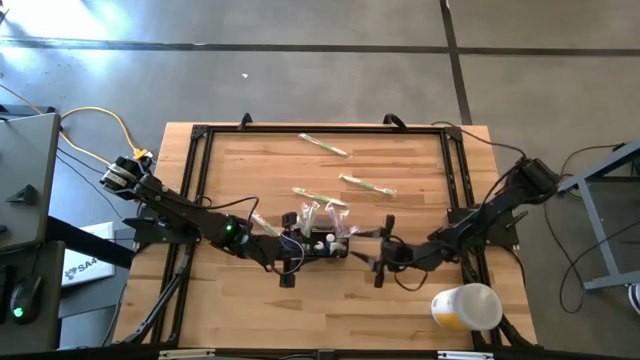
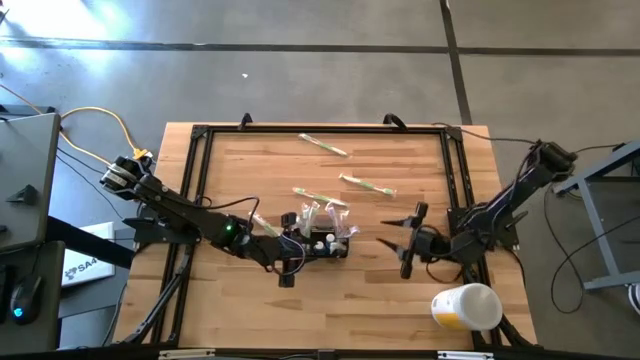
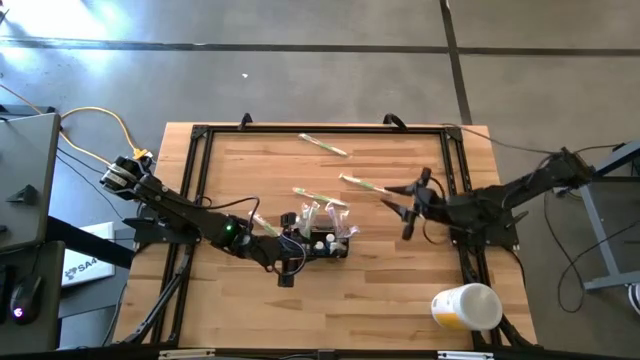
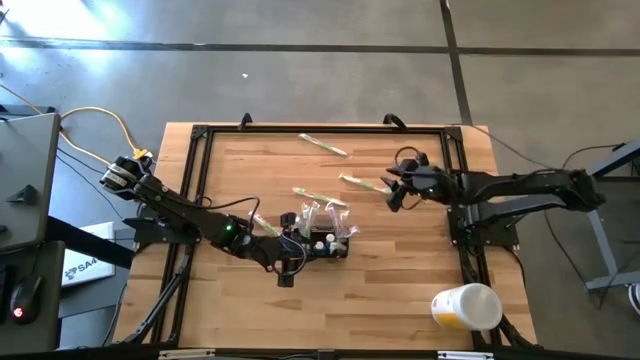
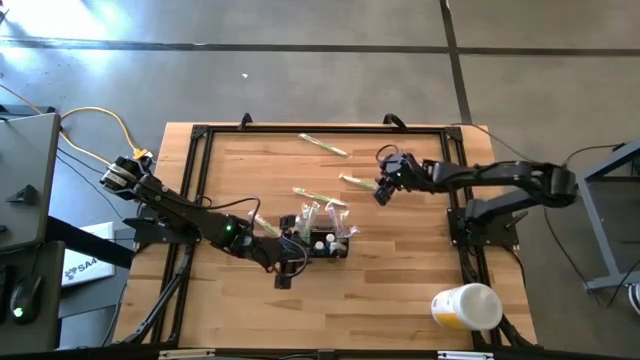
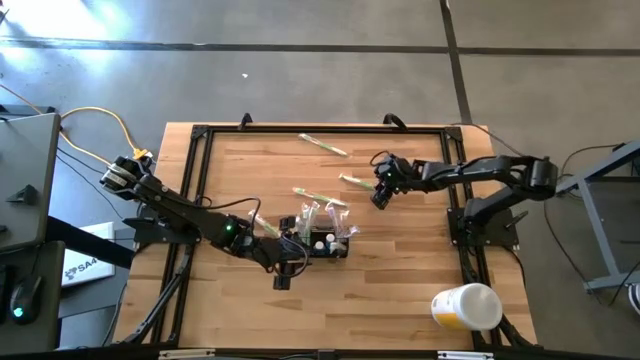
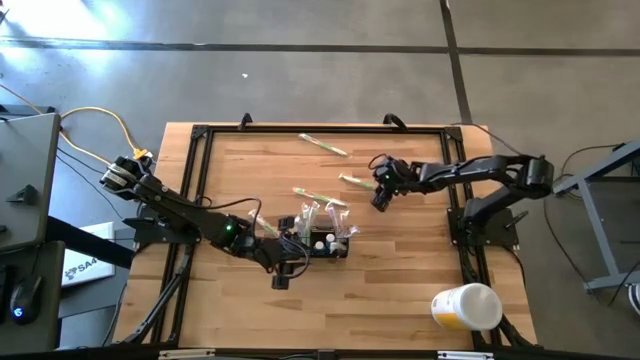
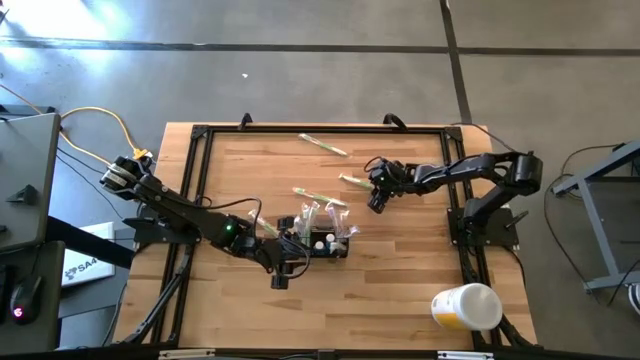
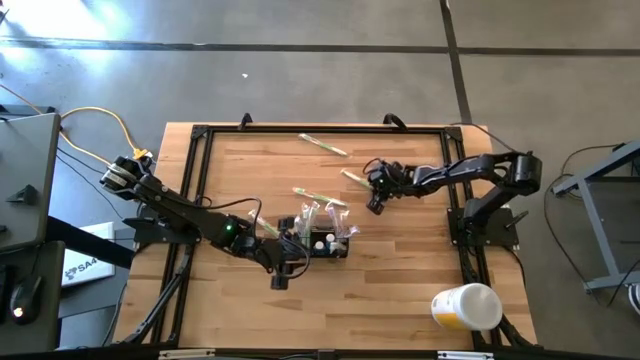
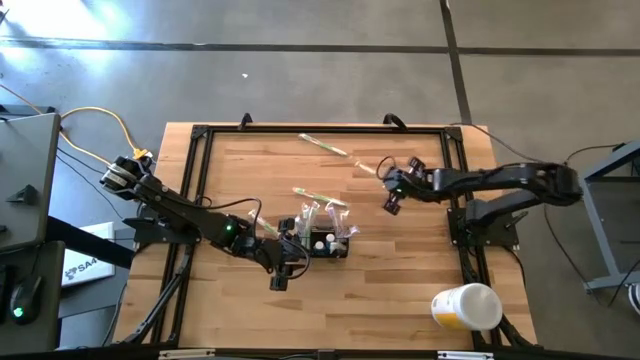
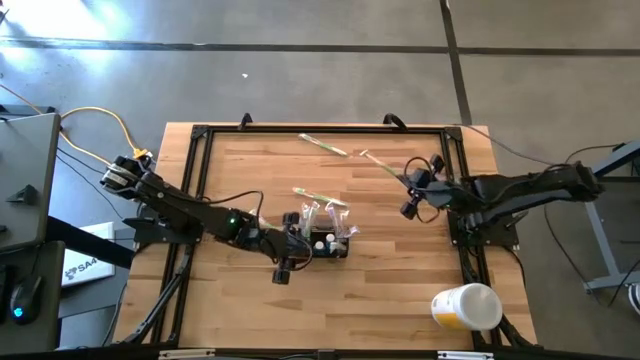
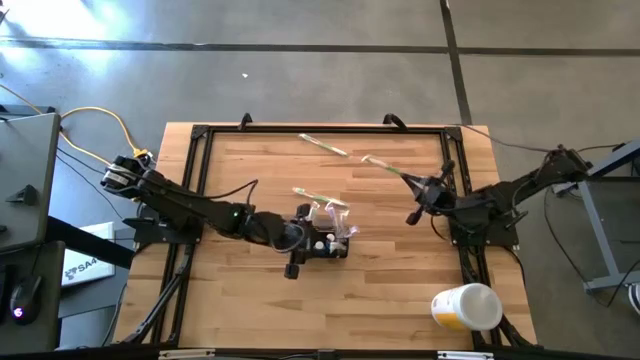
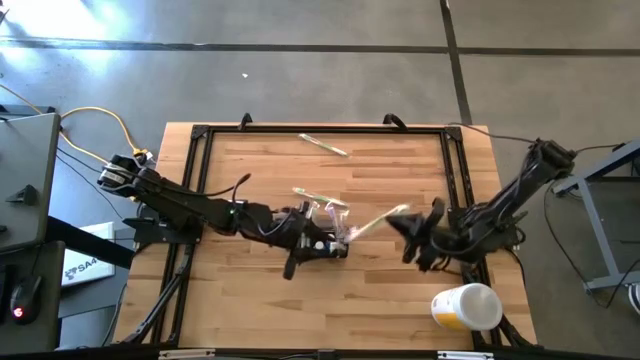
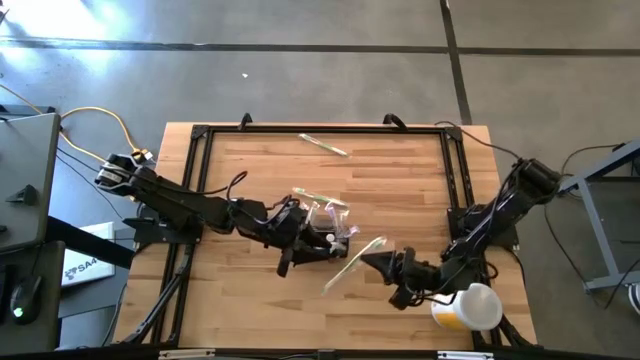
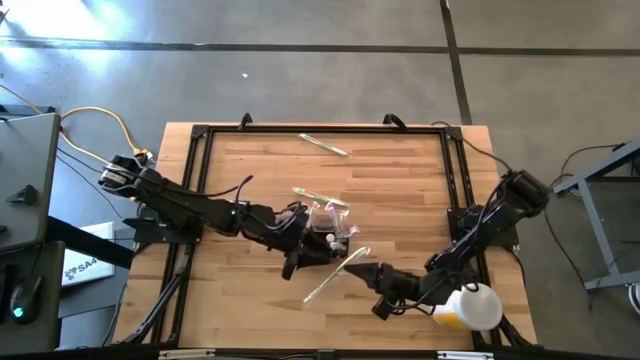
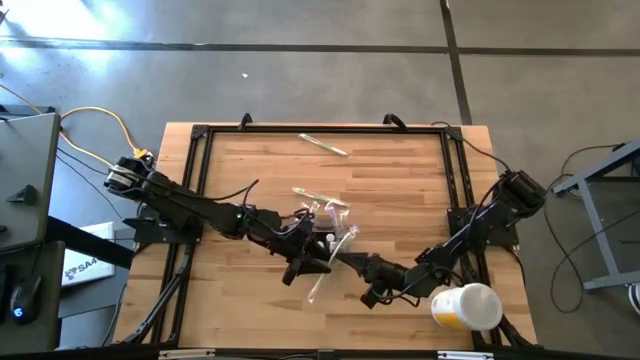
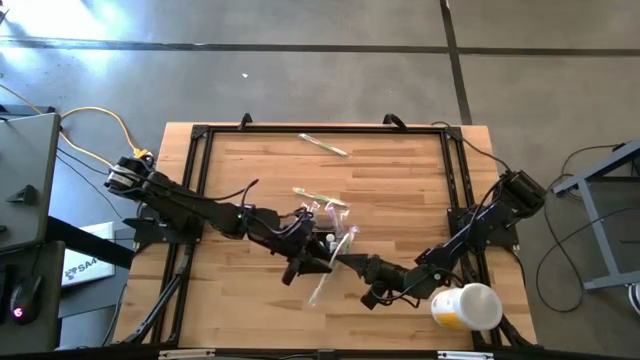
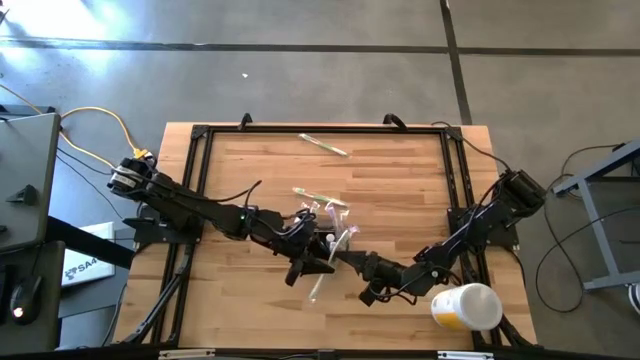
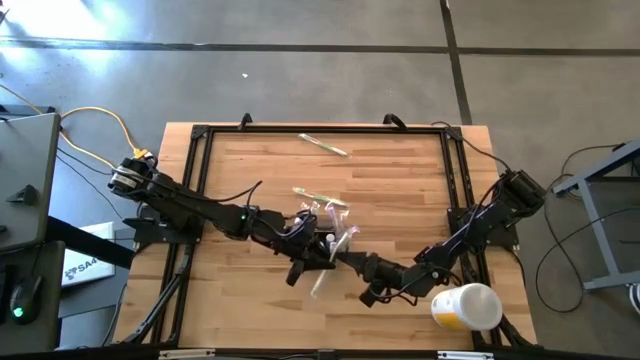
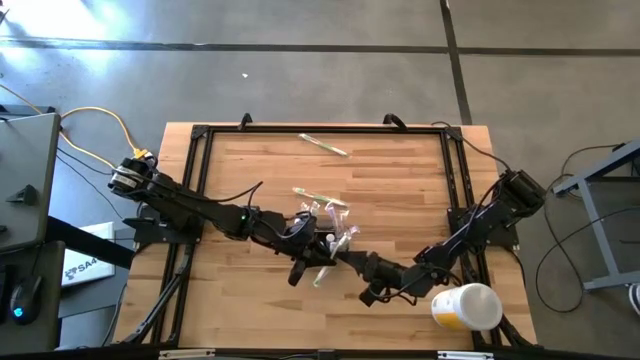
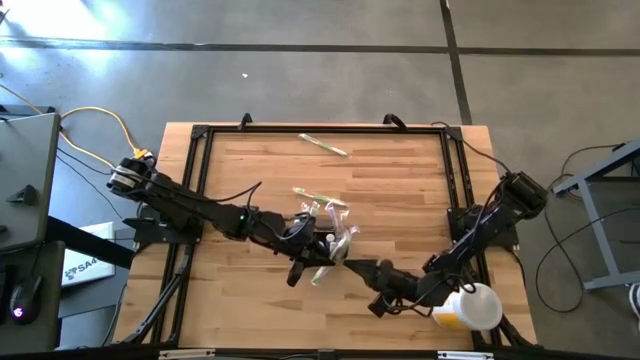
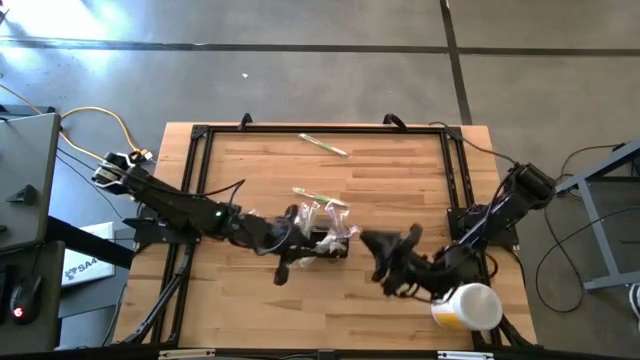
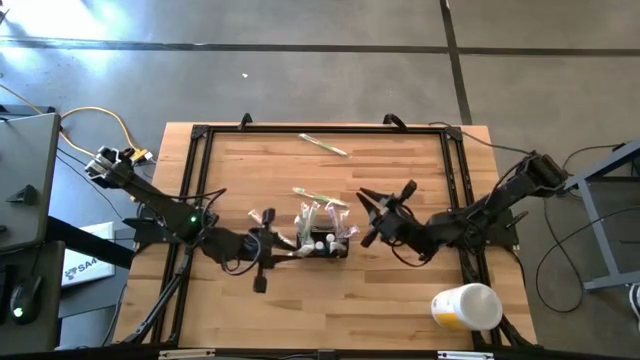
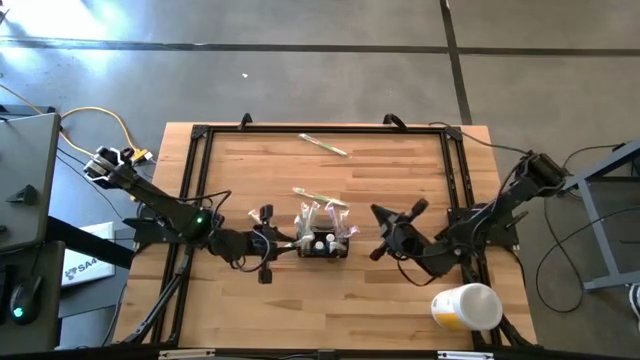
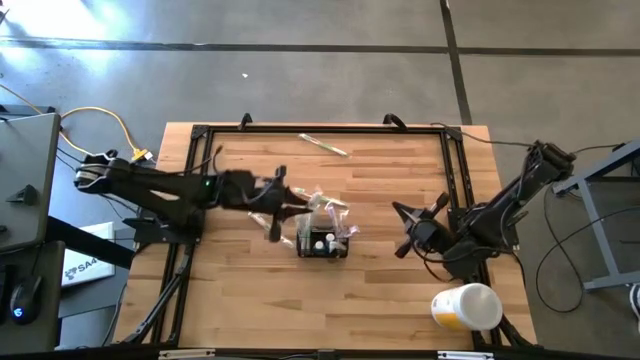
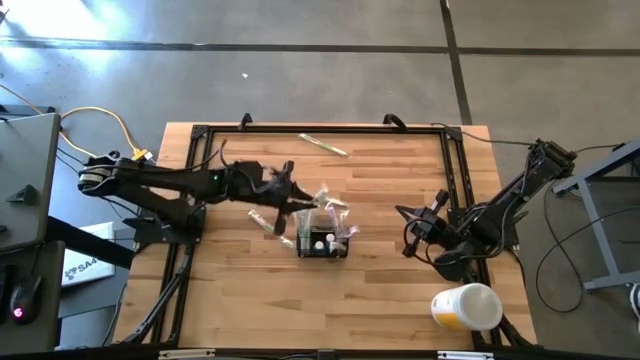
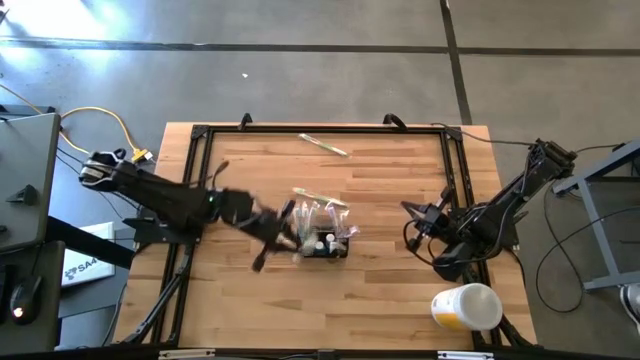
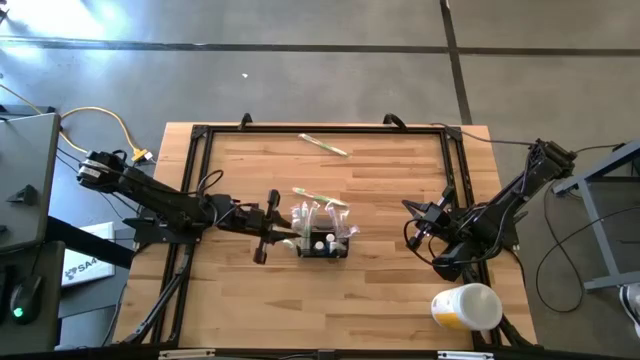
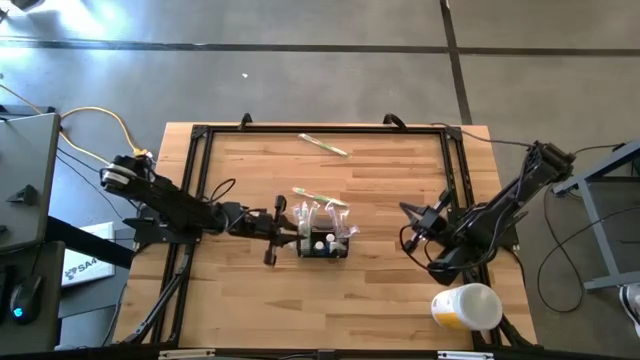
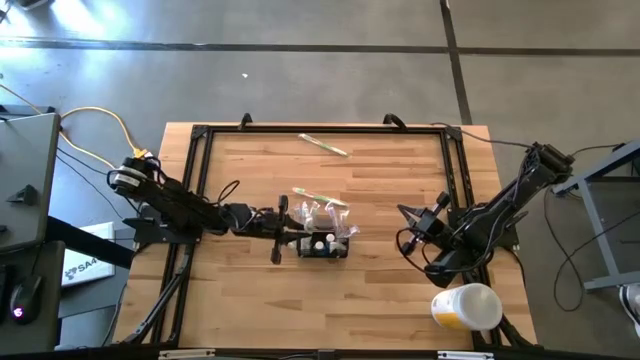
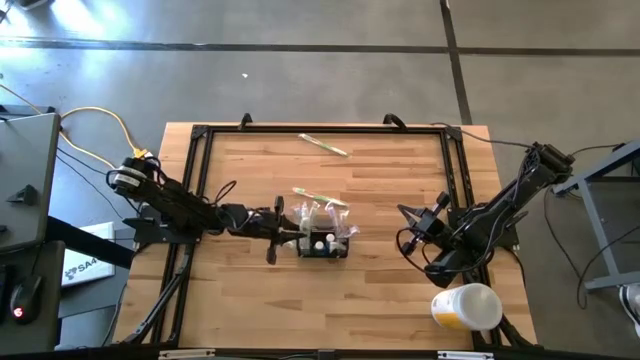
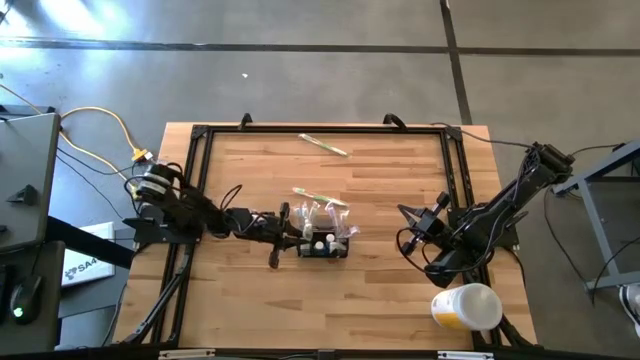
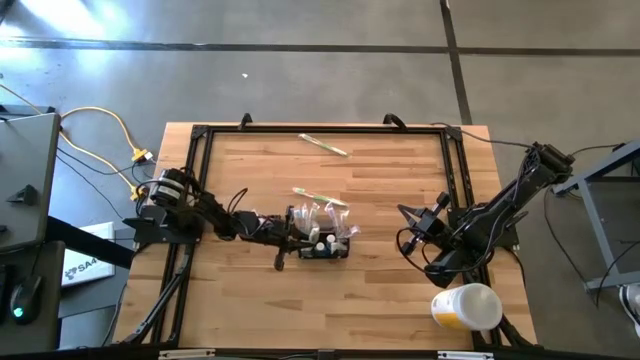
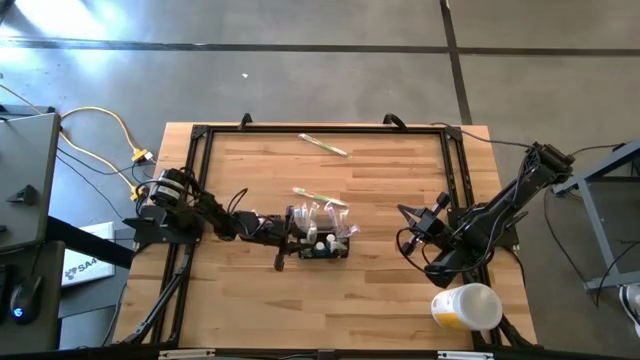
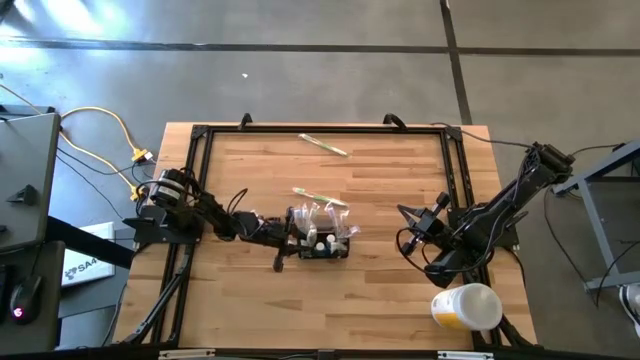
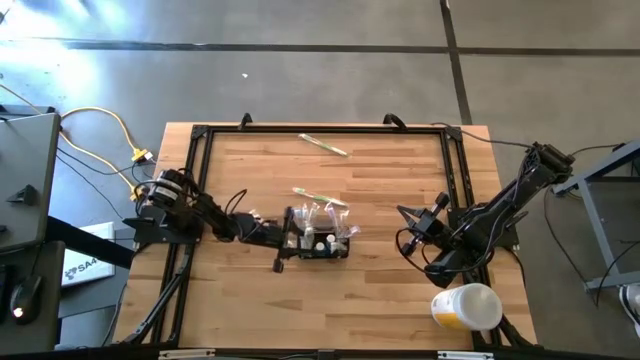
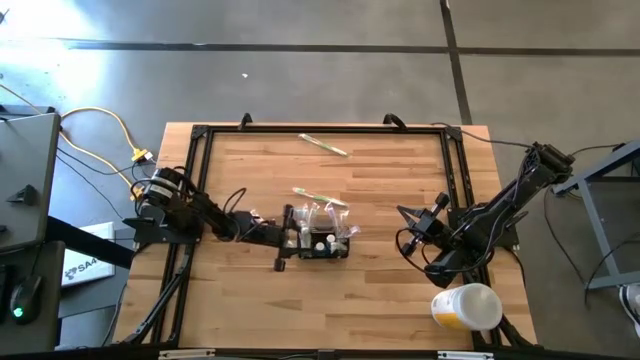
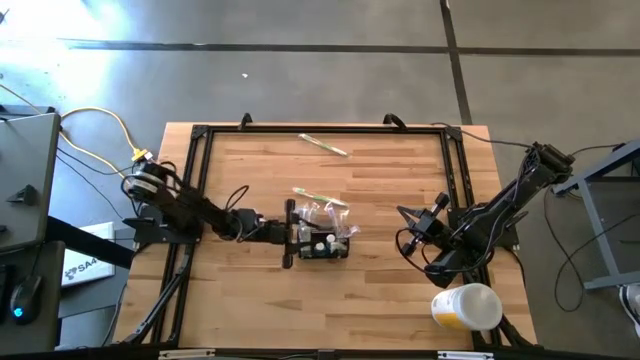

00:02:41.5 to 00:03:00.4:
Task: Pick & Place toothbrushing station
Put the green toothbrush into the wire organizer

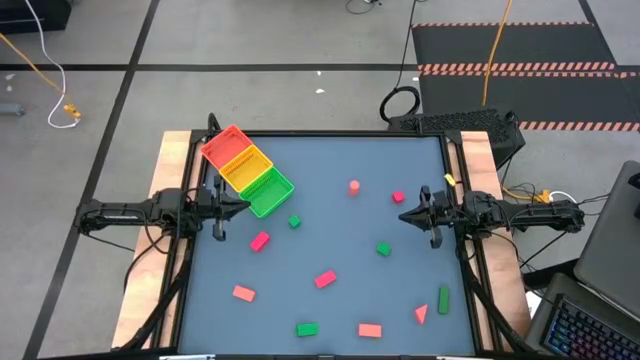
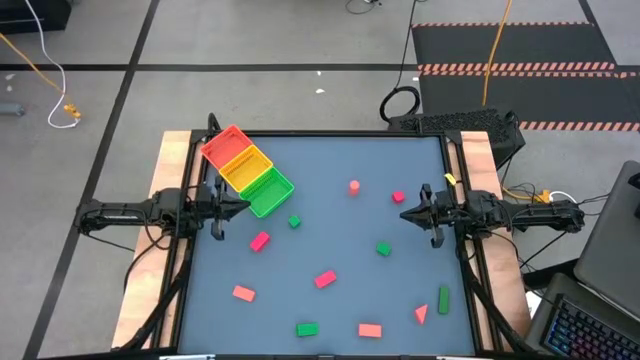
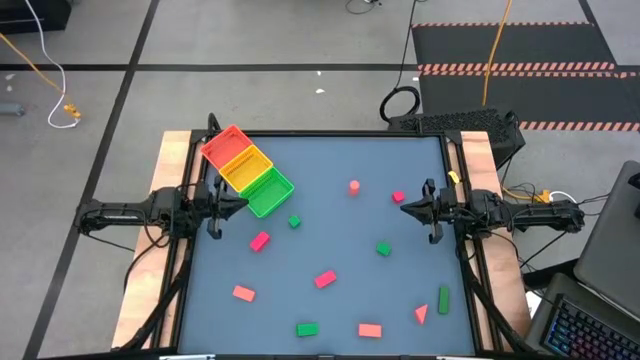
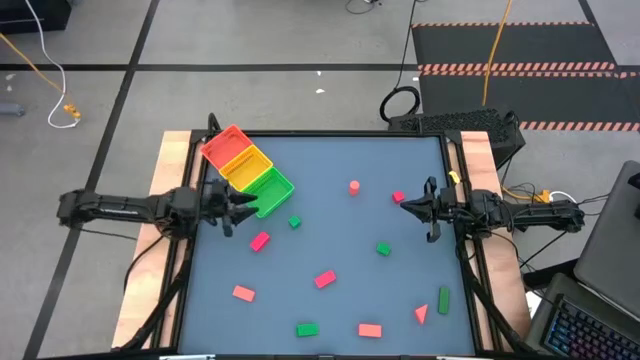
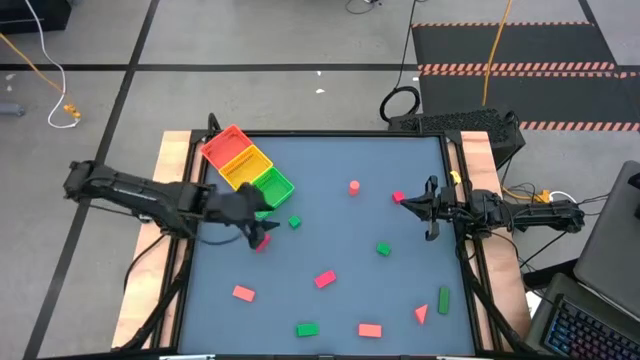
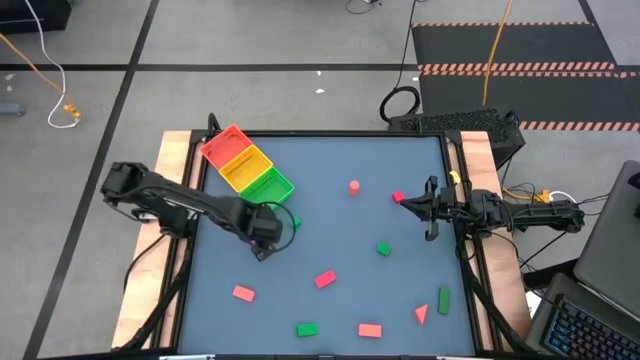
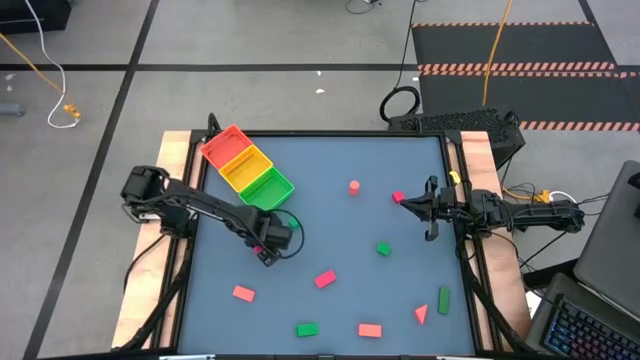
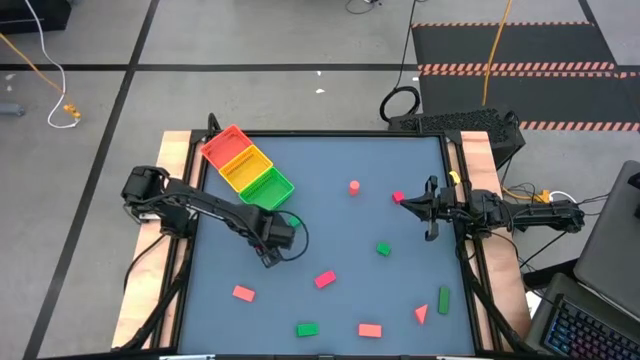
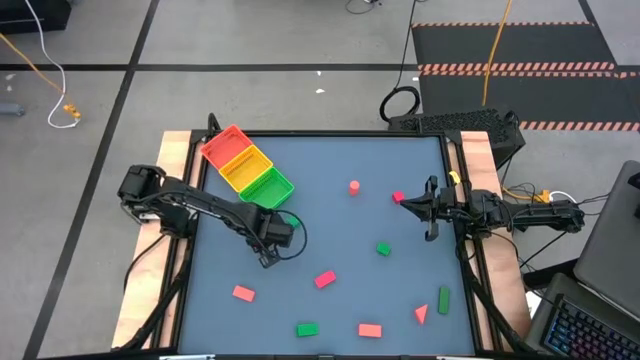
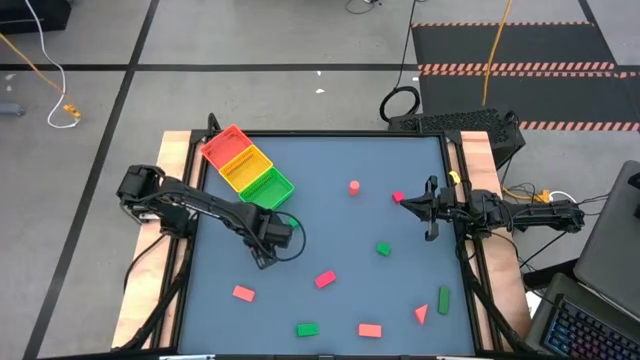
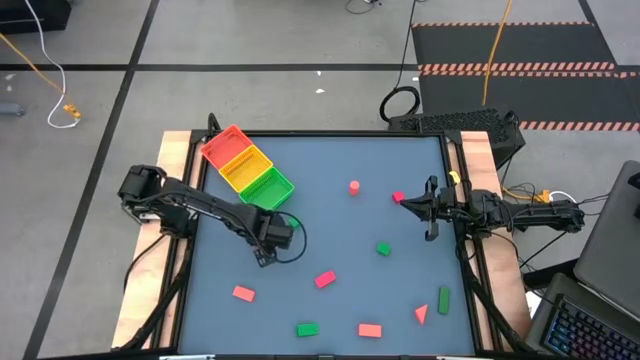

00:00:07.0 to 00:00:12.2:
Task: Sort & place blocks by color
Put the red block into the orange basket
